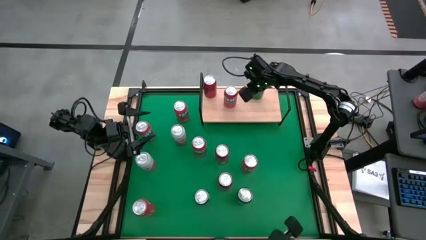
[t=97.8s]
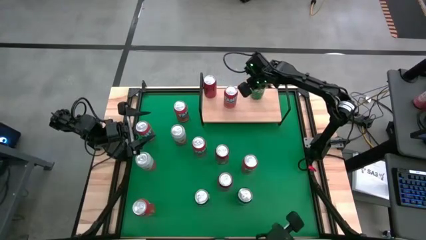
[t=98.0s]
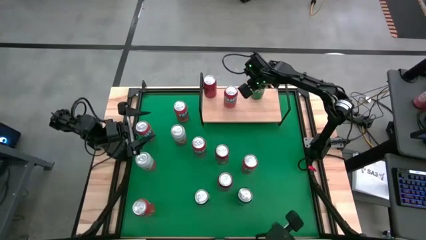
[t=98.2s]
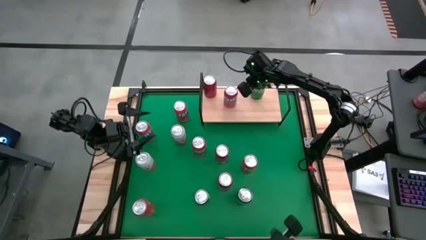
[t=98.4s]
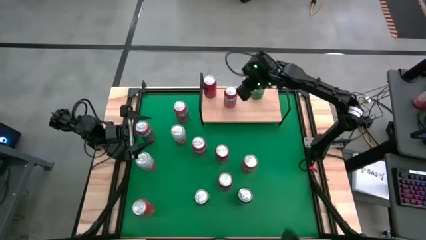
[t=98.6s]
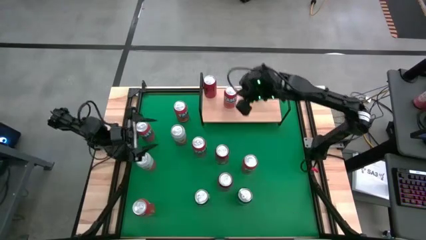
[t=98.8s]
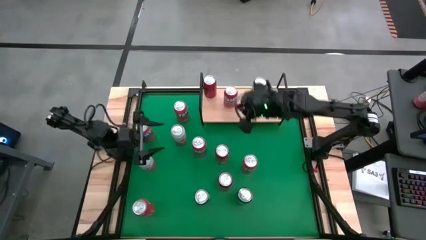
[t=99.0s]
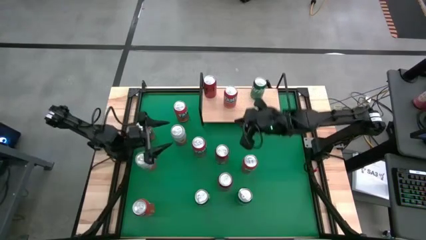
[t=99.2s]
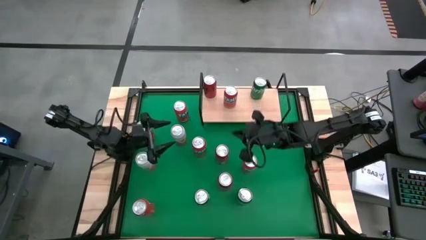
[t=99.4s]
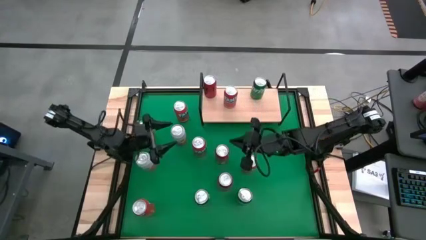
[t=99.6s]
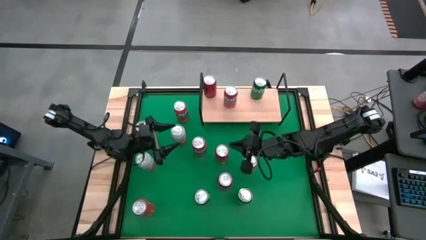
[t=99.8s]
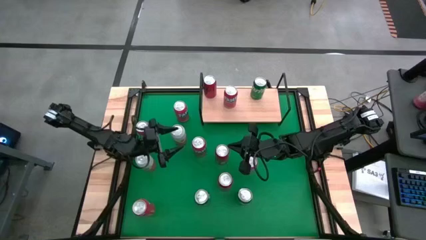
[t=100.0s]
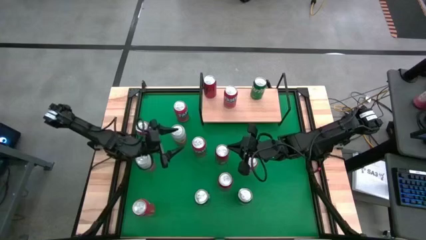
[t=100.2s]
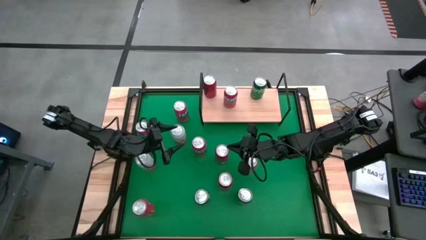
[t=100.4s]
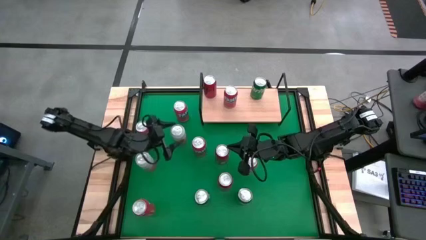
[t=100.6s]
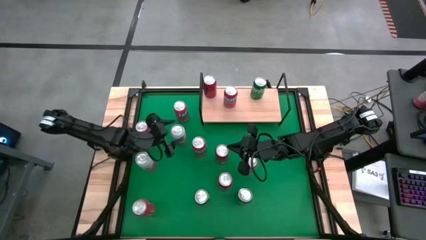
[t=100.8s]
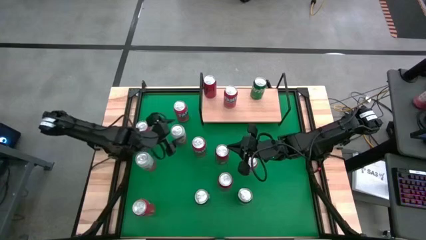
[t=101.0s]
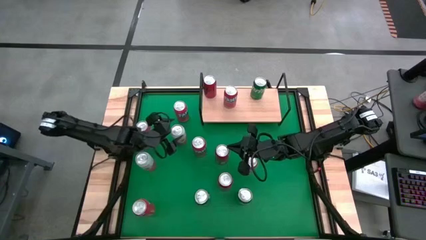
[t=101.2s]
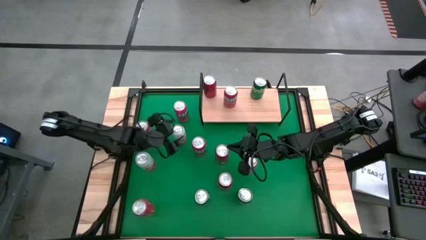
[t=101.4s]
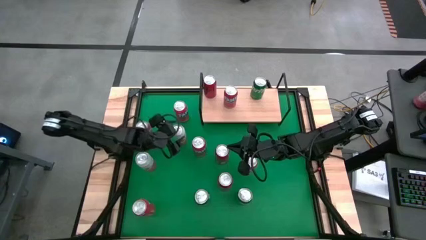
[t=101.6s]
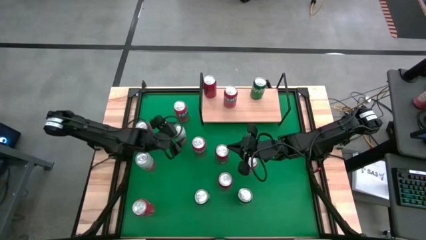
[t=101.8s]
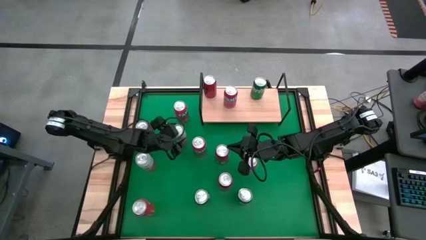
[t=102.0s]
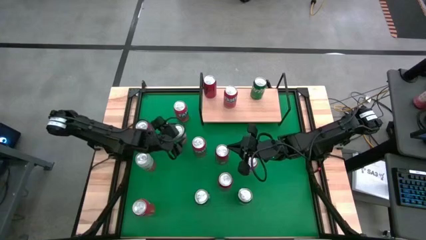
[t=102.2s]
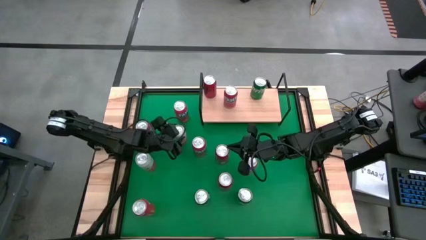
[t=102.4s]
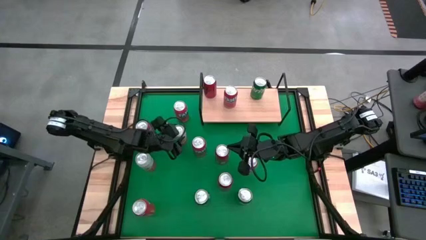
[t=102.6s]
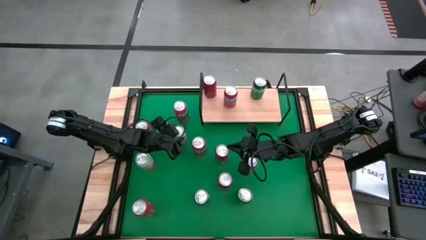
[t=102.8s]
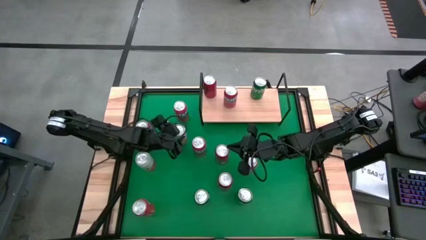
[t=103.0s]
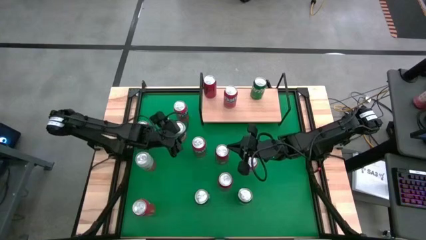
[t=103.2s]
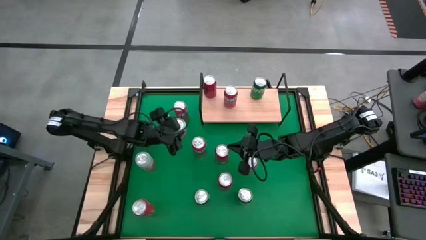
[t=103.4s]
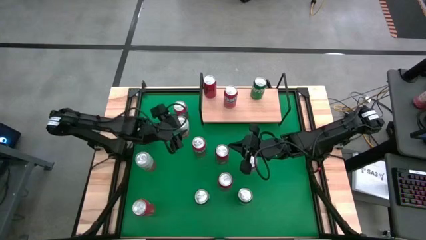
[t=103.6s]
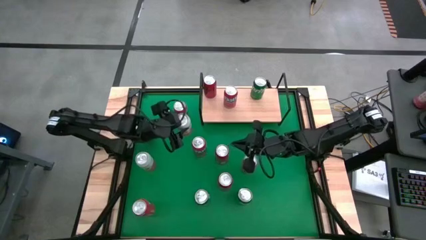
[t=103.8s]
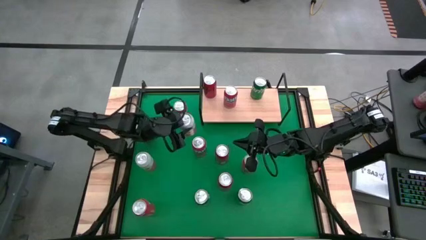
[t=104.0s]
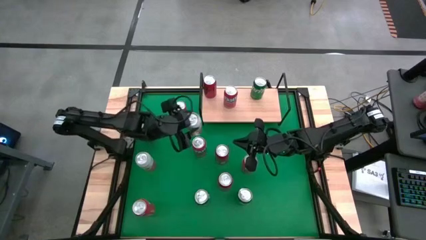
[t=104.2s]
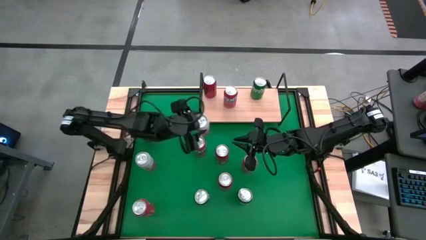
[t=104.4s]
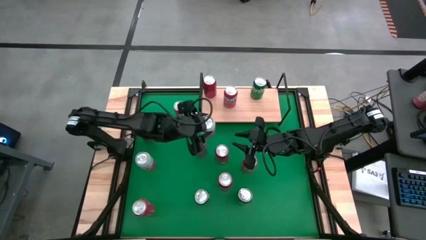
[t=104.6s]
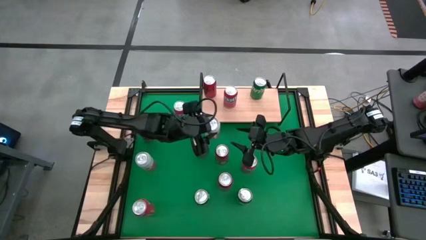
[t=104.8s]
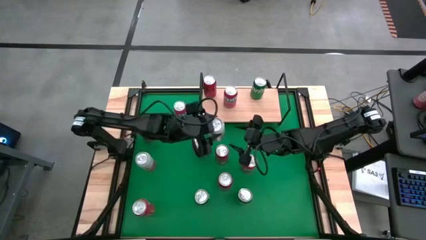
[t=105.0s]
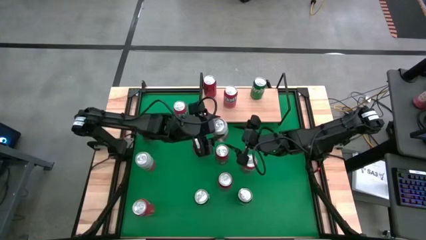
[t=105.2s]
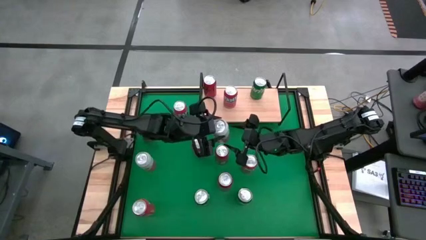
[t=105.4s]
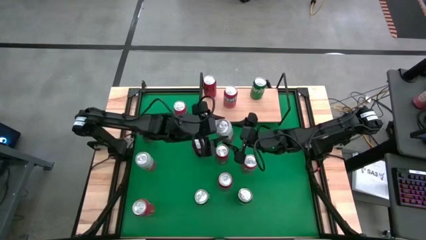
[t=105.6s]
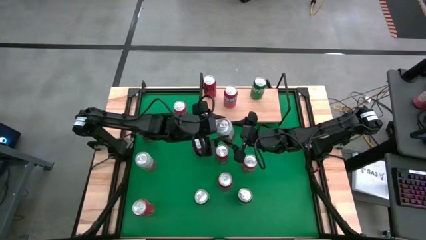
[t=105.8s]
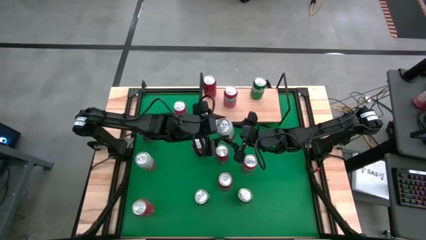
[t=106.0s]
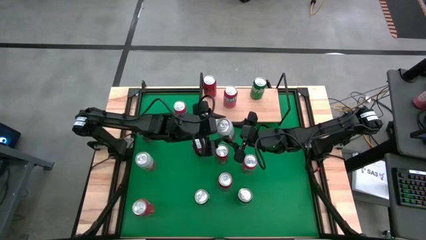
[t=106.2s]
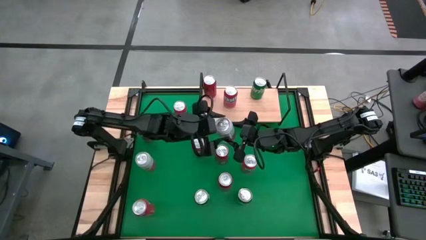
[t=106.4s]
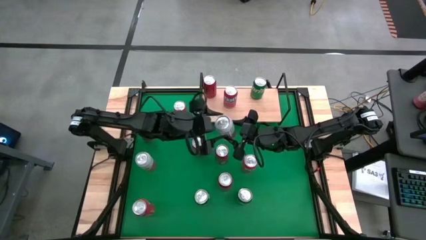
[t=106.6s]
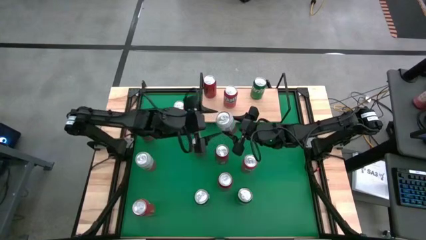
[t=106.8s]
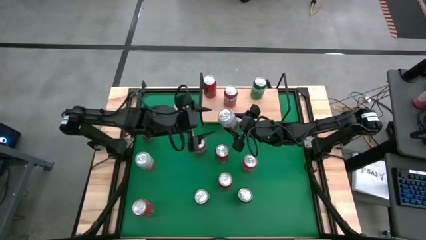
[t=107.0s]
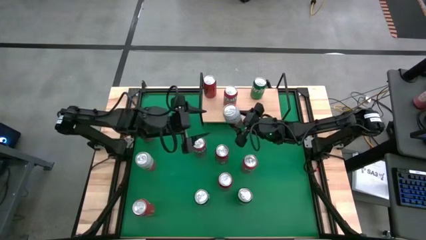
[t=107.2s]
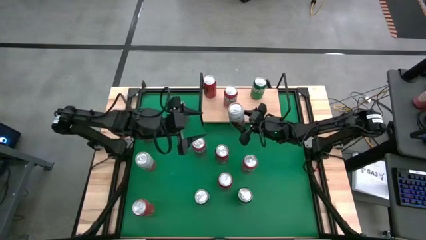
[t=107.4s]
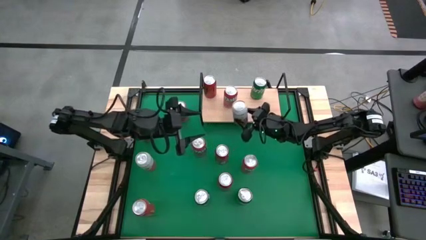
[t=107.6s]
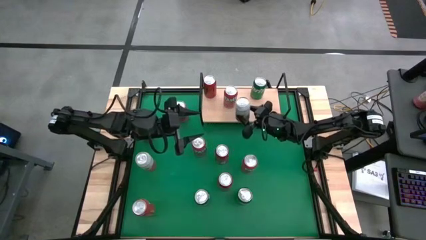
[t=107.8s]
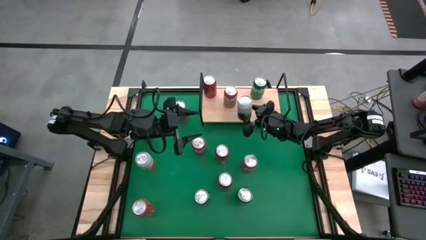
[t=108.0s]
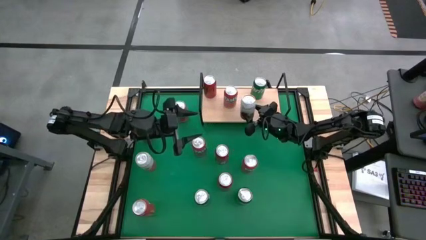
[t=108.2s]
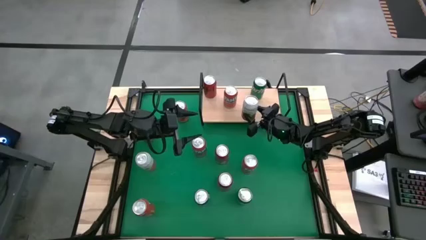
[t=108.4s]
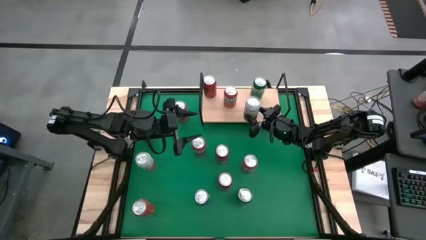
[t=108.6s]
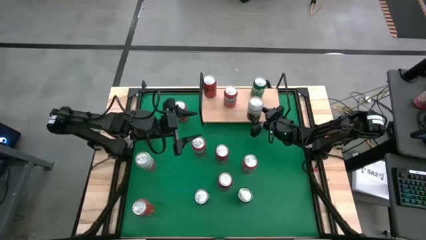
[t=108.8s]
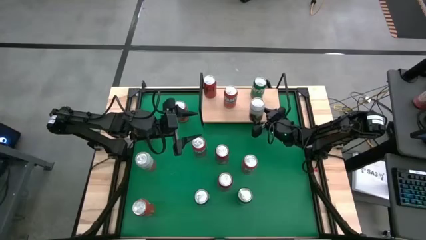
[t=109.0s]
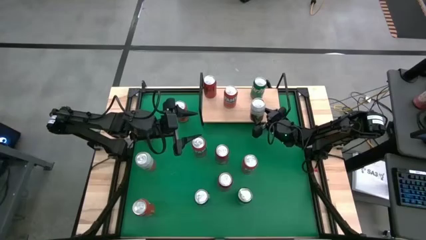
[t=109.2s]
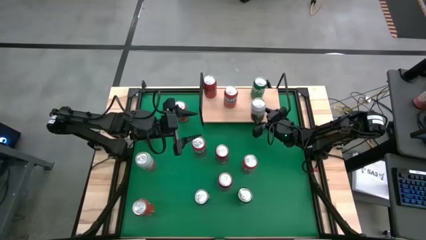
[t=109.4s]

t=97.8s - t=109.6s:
Task: Place canned beverage on shelf
Put the pink-white soda can on the shelf
